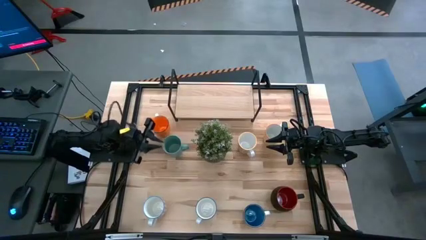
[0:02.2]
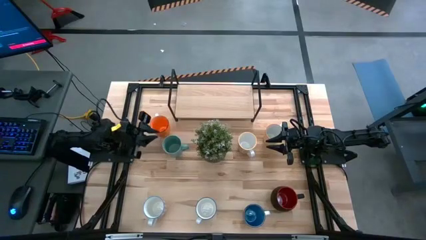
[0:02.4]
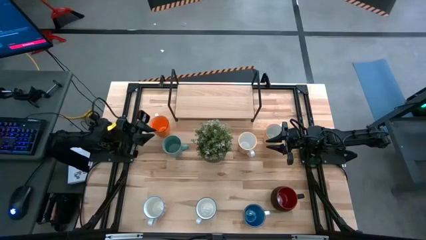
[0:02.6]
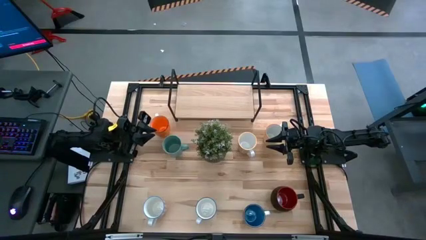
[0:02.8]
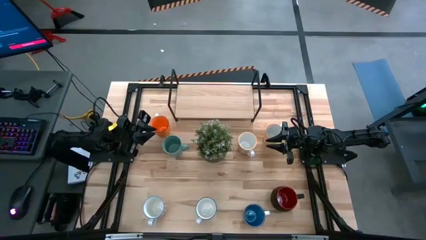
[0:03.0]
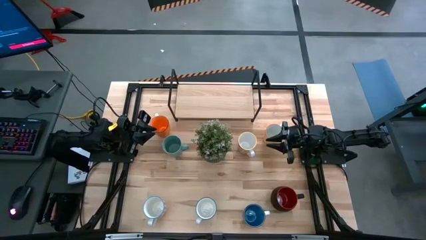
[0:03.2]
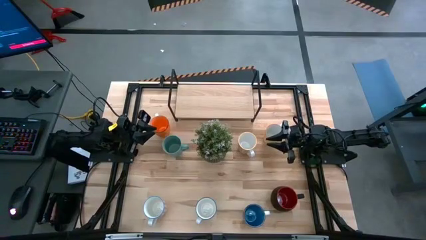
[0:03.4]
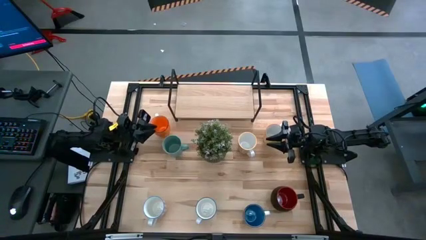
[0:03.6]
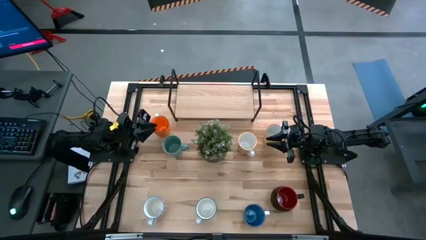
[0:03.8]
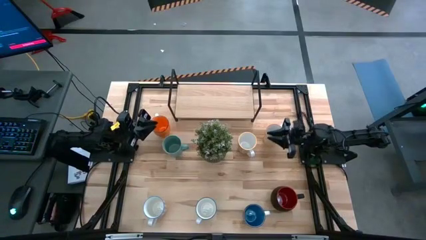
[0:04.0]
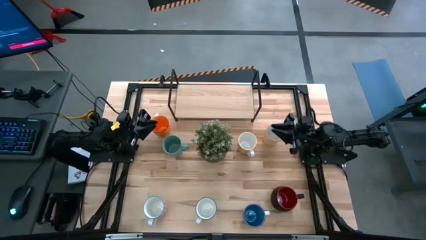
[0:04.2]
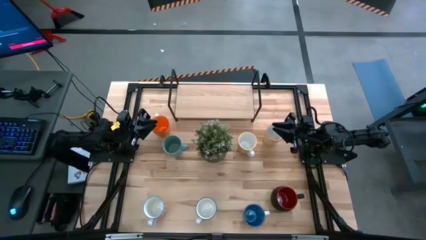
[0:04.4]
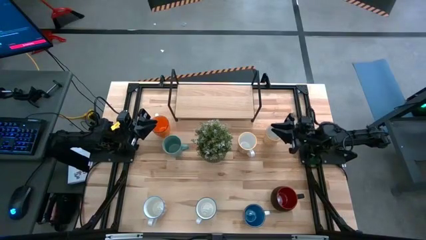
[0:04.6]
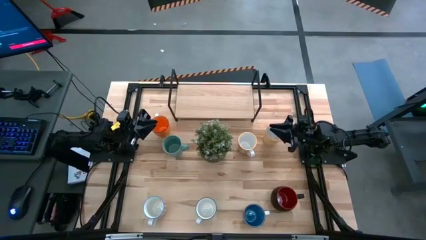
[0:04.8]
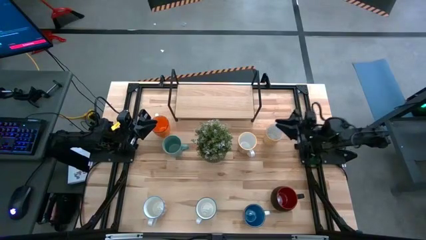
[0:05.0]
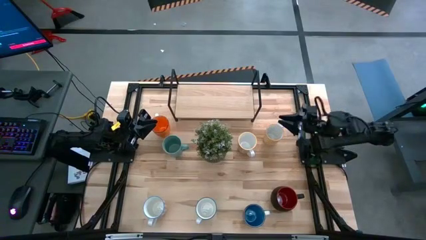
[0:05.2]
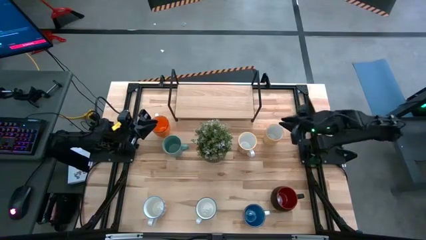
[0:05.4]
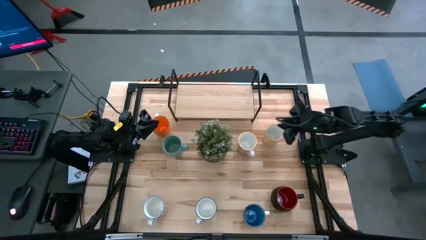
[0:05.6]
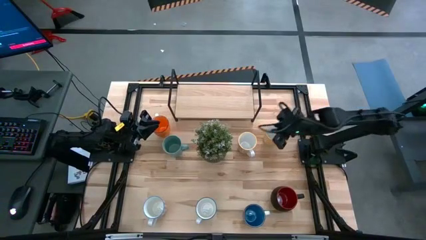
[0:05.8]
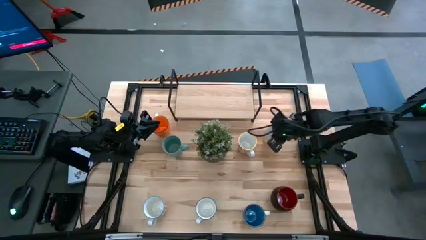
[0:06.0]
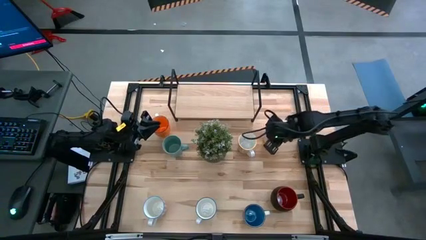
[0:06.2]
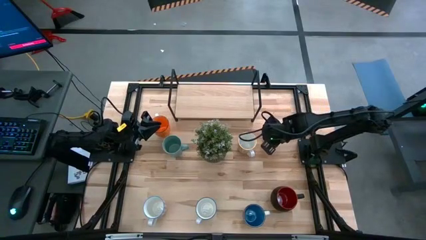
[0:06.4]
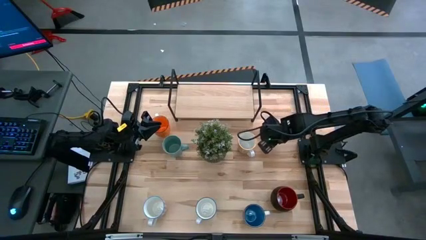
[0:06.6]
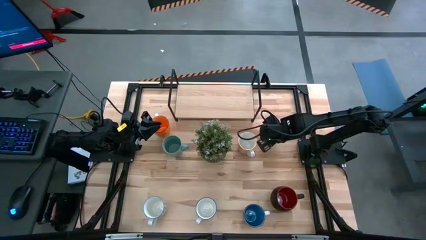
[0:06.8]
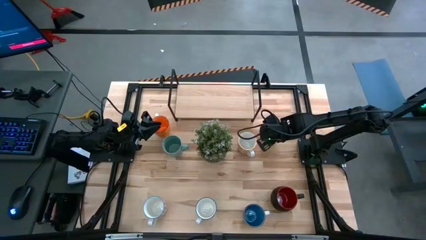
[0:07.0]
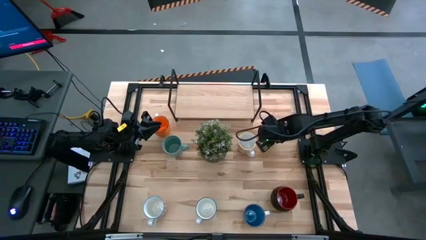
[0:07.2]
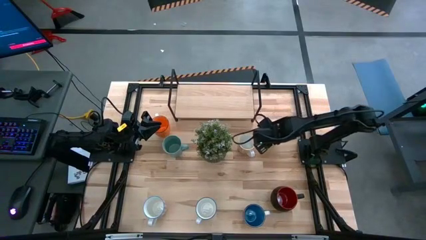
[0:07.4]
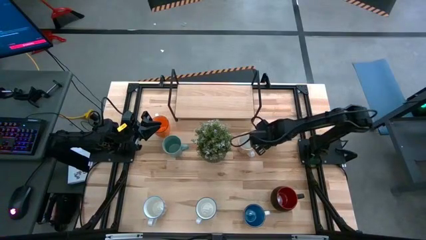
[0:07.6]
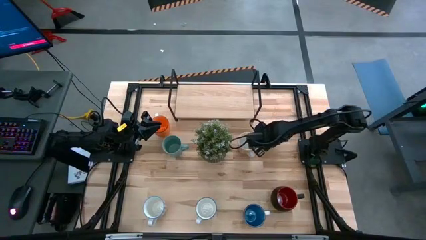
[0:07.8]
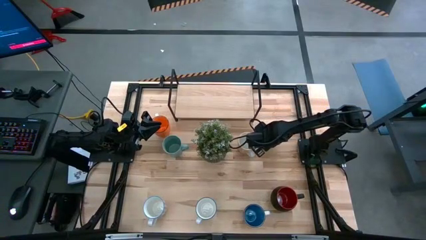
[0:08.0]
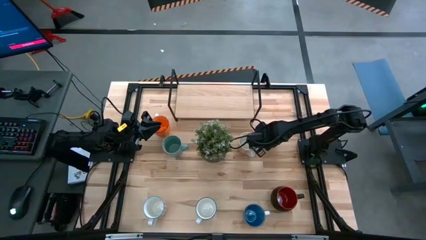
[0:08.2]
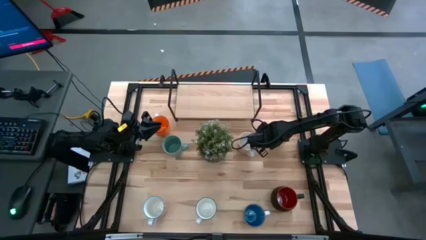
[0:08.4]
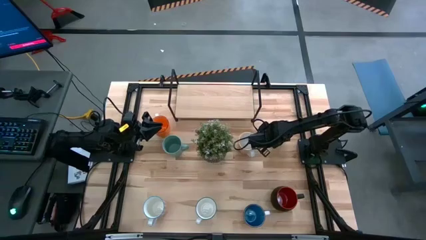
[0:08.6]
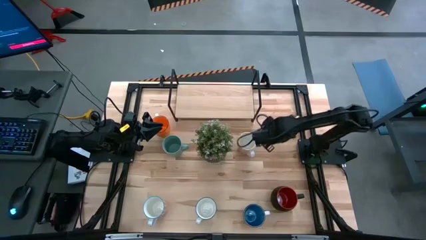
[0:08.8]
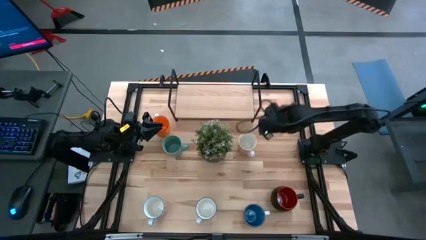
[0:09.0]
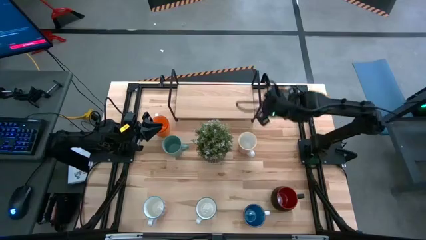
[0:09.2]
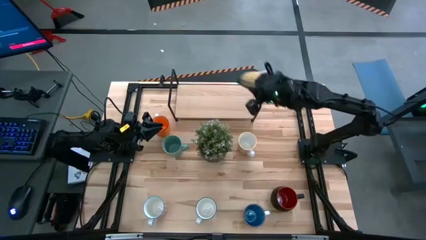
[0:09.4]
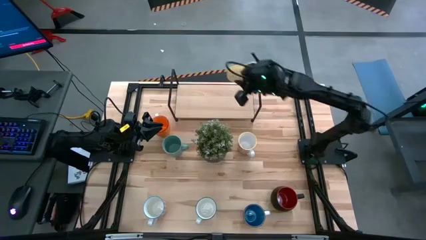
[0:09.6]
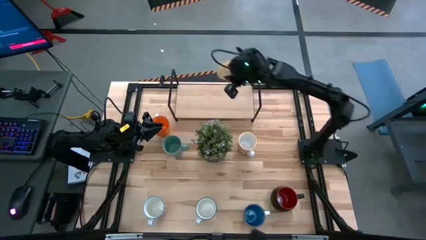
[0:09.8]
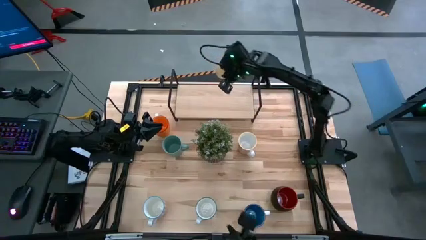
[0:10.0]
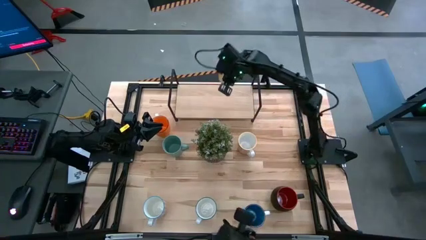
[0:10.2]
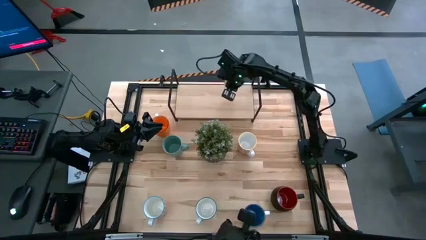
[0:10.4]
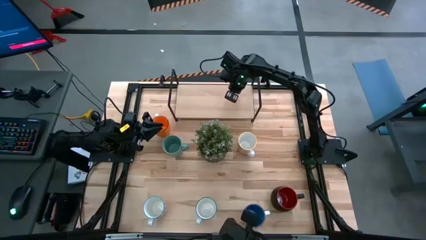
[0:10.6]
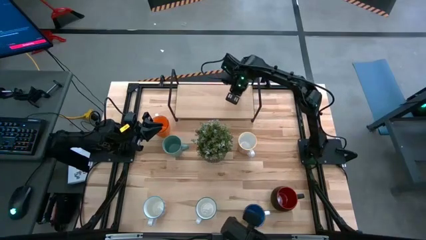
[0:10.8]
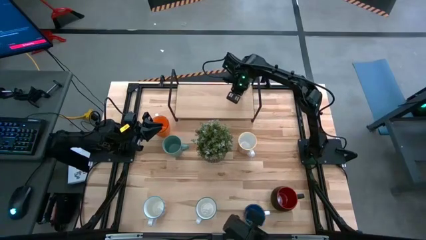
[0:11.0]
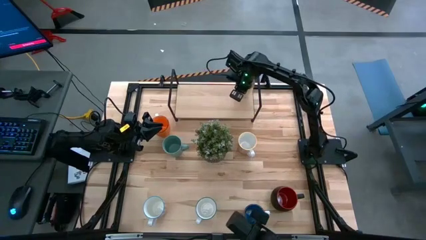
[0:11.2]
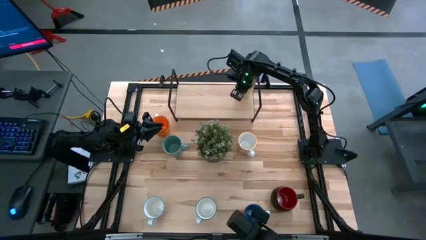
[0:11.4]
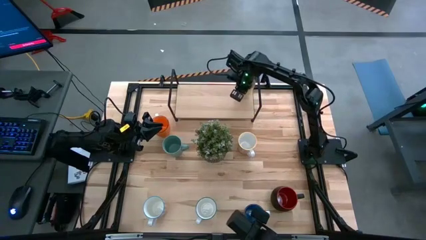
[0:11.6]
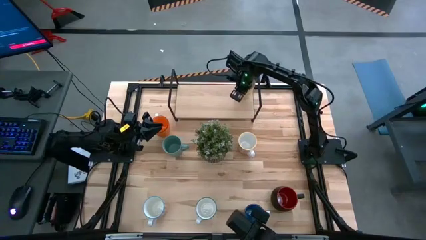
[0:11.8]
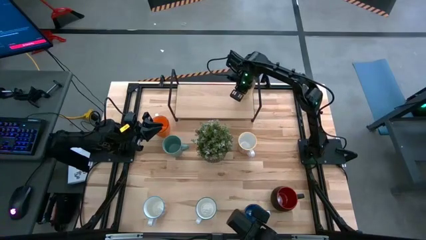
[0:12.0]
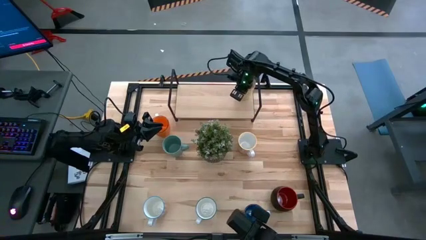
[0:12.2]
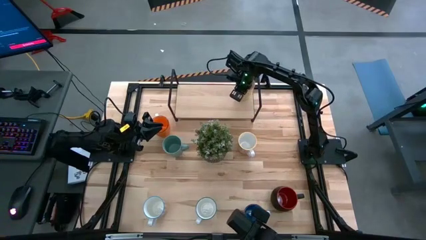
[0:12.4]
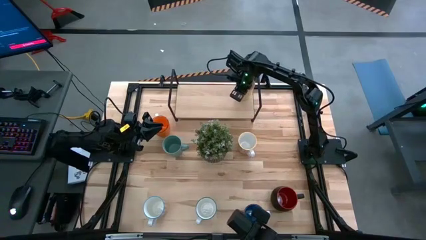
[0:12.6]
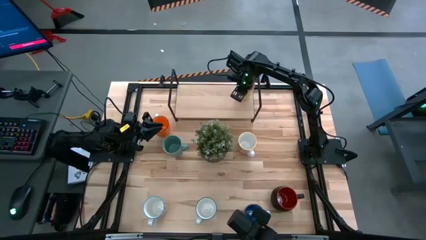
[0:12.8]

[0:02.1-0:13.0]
Task: Place coffee mugs
Put the yellow patterned mug on the shelf

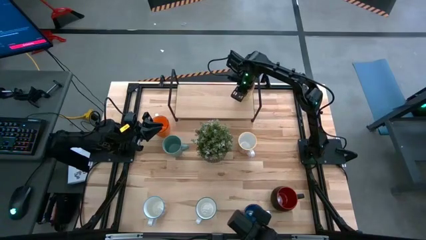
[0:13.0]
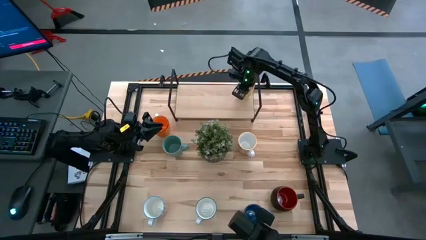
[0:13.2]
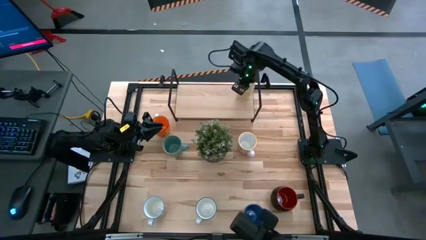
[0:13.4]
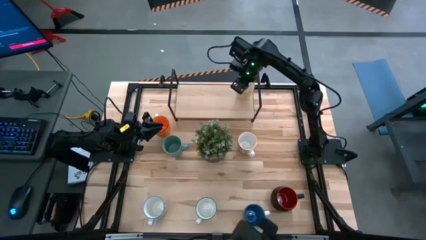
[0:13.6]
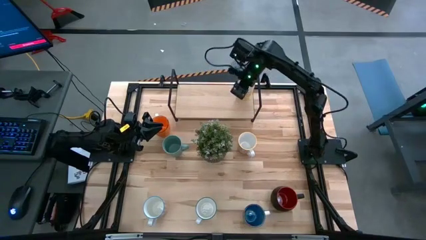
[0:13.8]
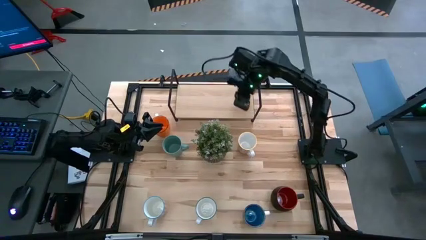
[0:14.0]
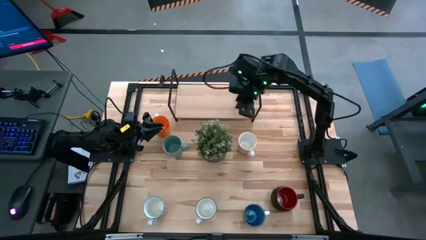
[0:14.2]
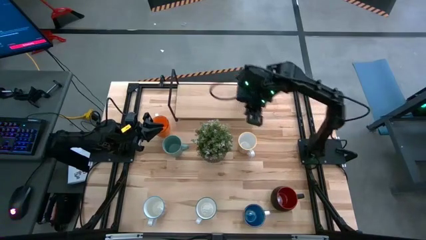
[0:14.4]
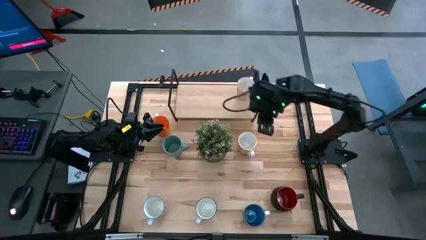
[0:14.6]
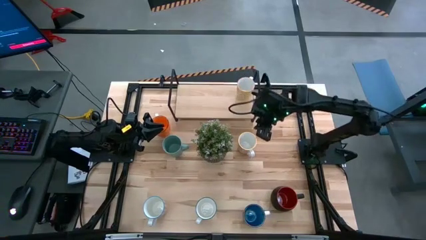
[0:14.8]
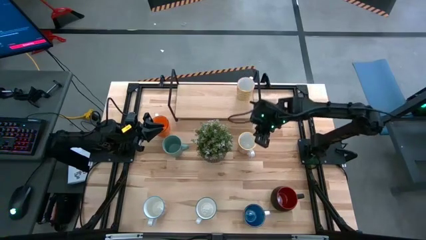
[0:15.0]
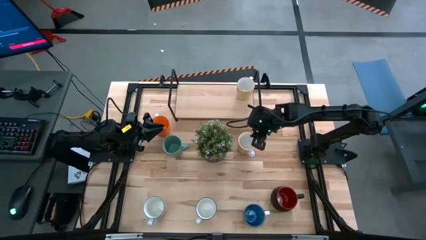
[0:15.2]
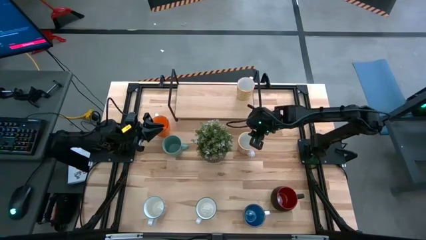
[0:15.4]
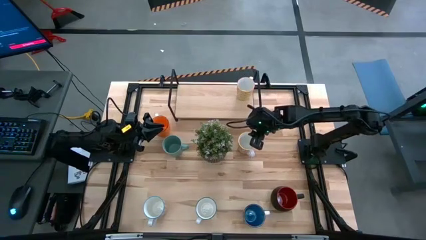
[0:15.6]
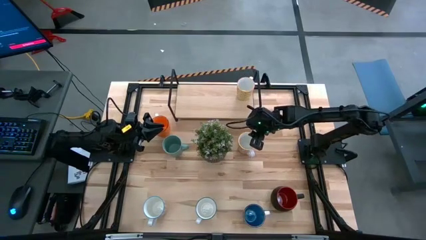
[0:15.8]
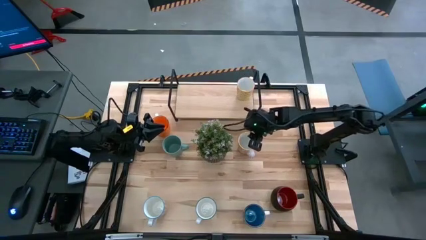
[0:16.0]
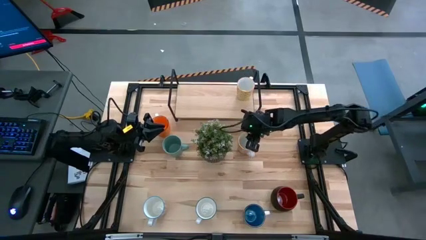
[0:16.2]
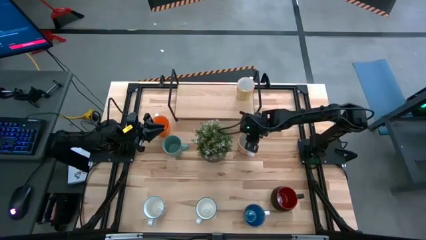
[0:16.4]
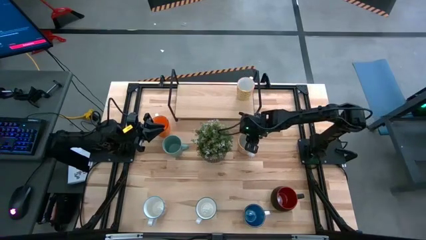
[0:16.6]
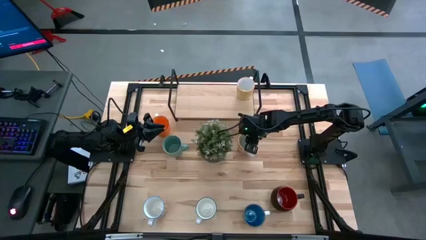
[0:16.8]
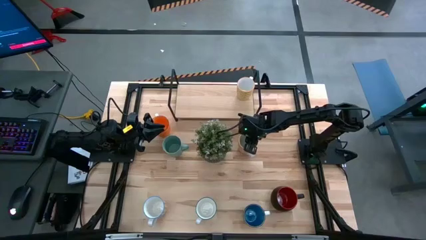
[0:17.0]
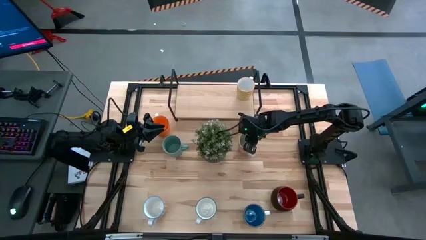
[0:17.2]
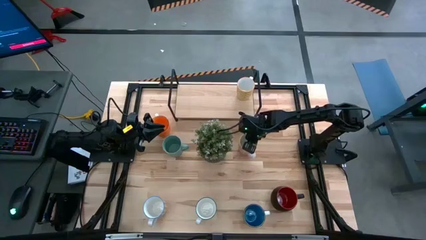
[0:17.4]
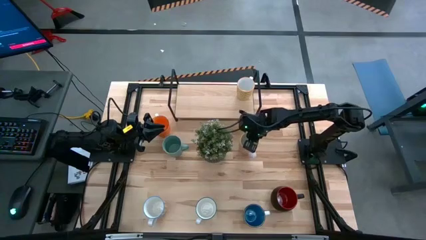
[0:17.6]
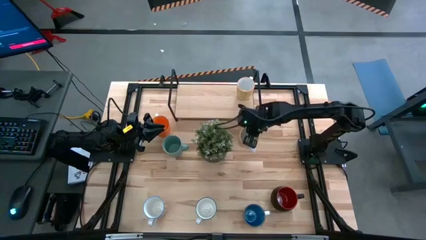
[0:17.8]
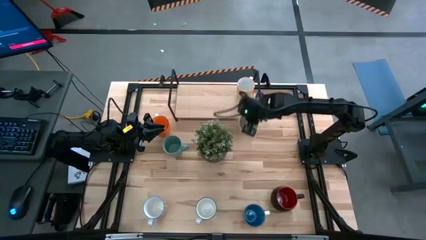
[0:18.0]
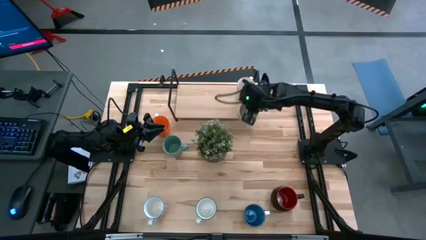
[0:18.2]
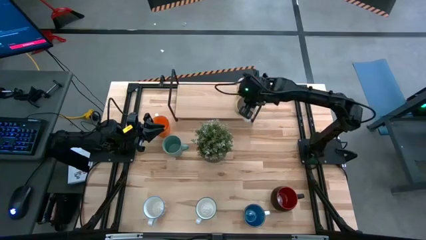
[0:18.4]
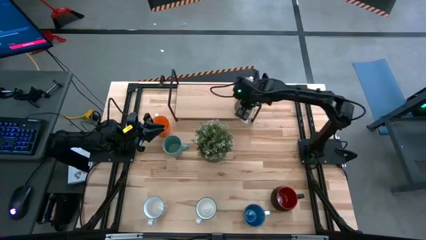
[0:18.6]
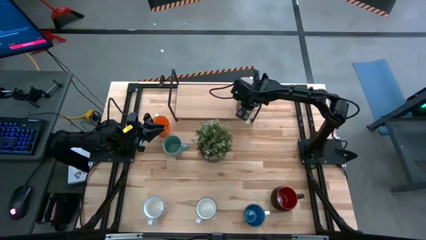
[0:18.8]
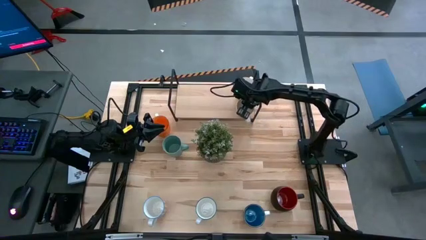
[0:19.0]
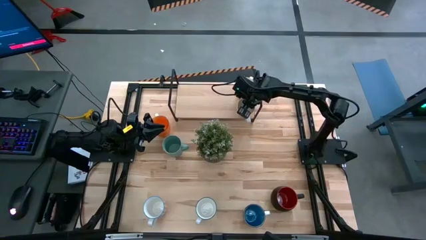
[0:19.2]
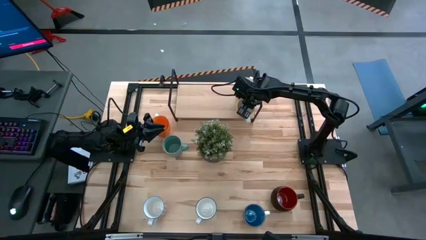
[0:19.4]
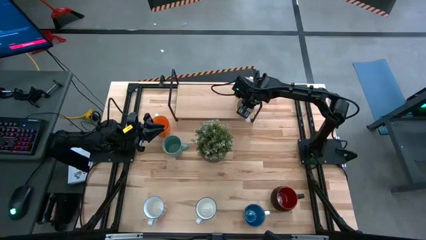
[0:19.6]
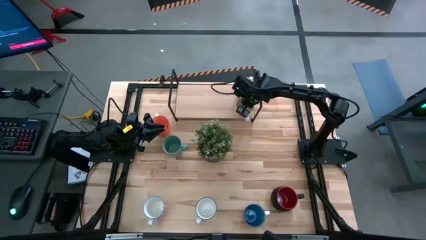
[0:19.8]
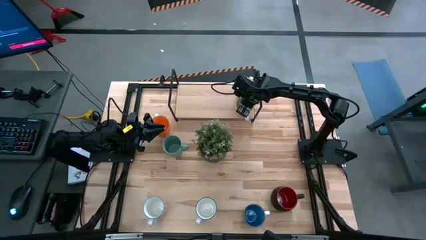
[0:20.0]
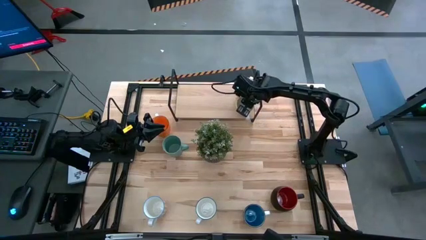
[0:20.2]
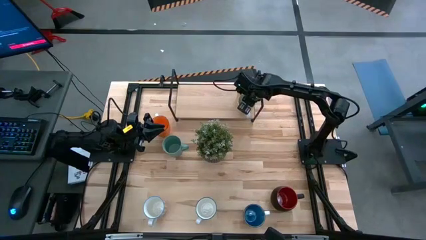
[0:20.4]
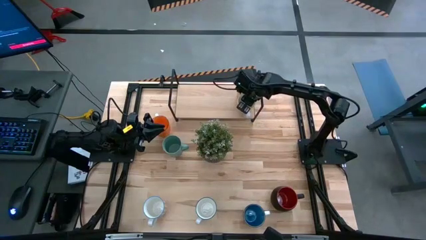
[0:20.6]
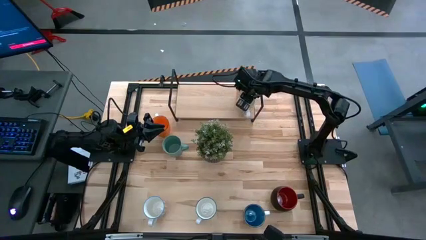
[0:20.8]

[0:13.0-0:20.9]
Put the red patterned mug on the shelf
